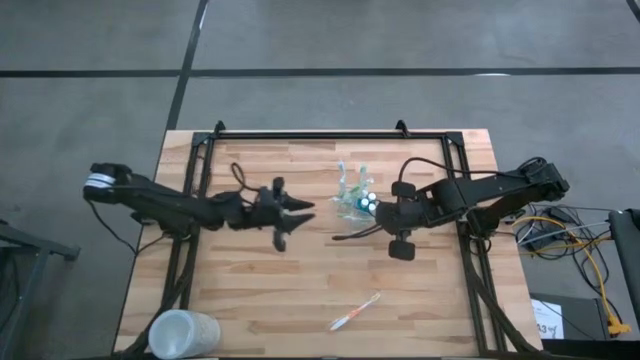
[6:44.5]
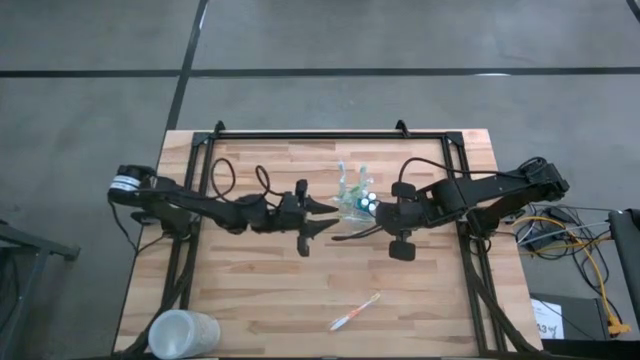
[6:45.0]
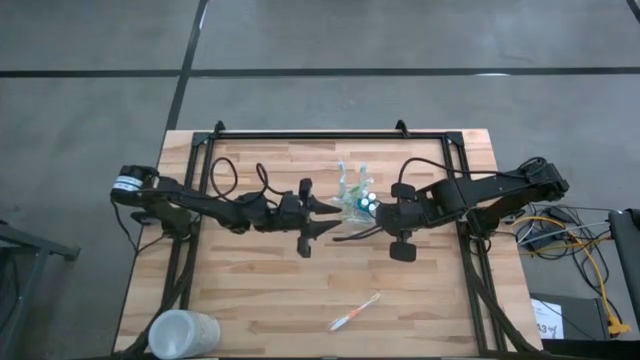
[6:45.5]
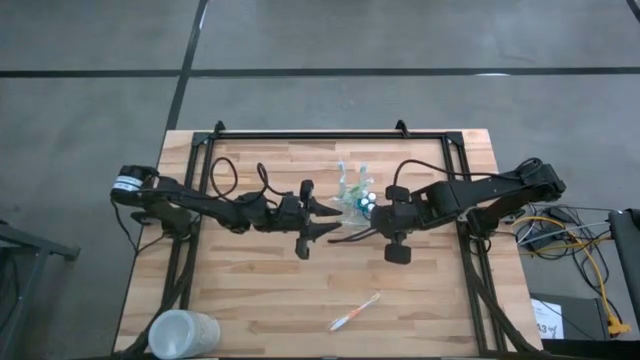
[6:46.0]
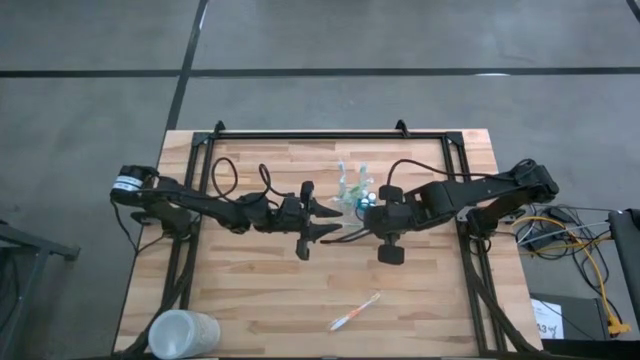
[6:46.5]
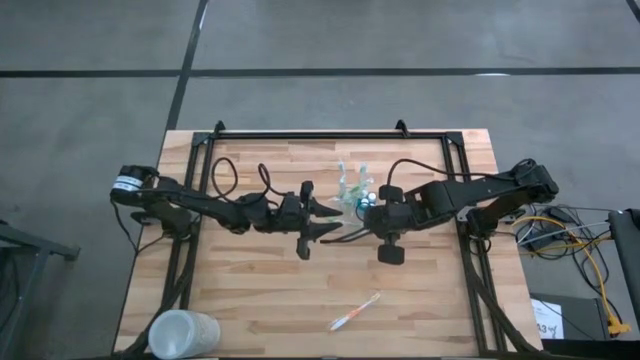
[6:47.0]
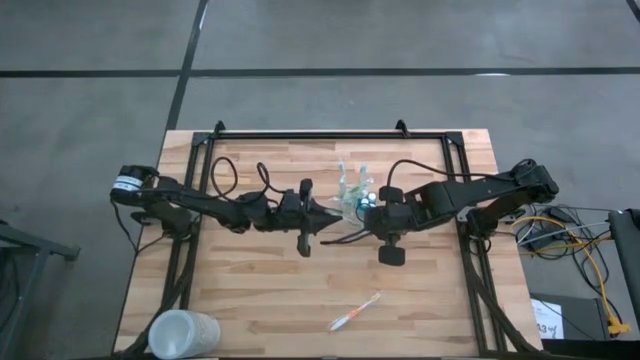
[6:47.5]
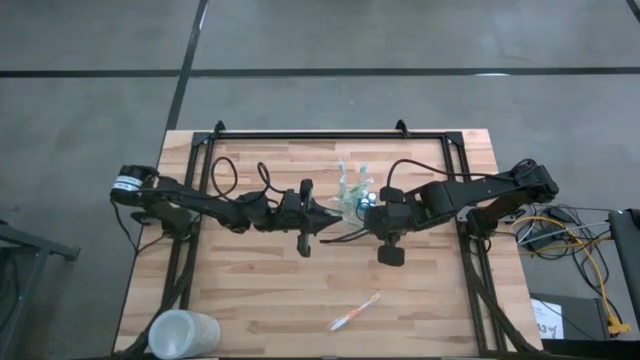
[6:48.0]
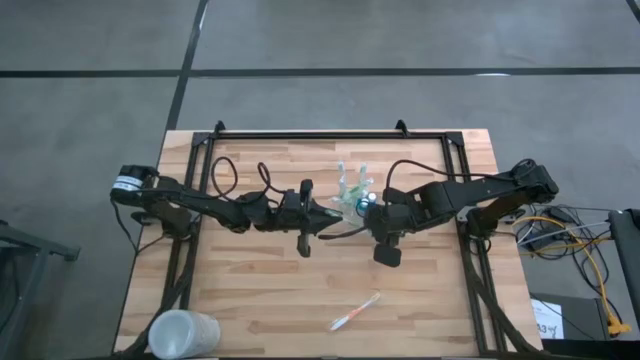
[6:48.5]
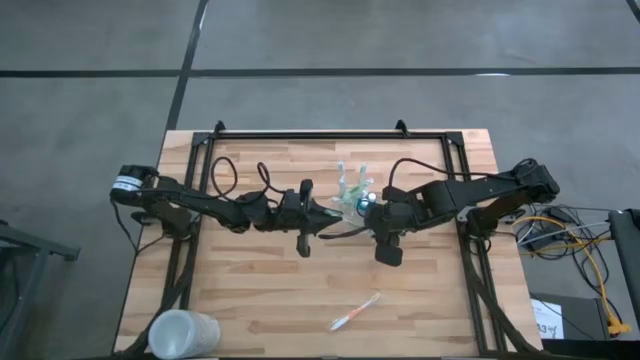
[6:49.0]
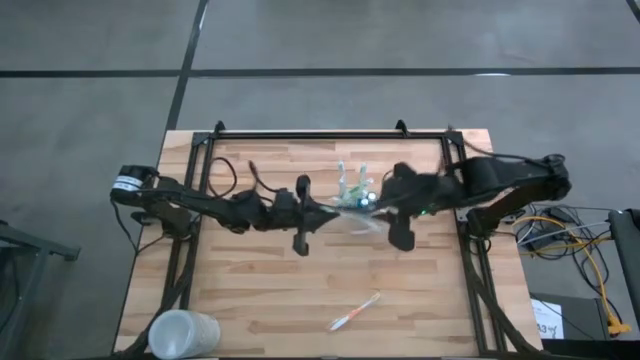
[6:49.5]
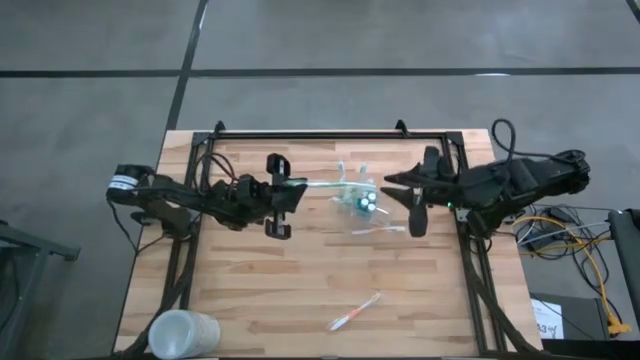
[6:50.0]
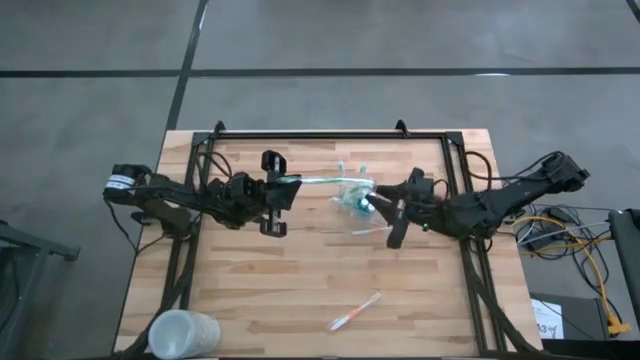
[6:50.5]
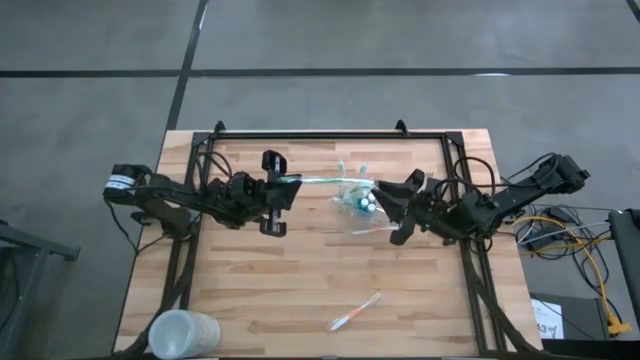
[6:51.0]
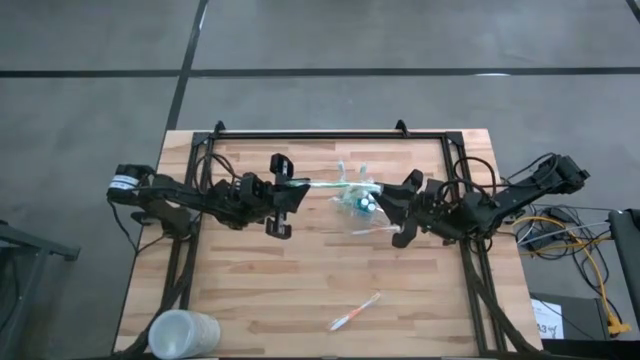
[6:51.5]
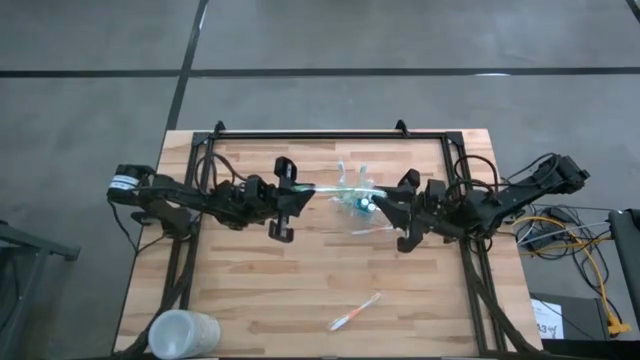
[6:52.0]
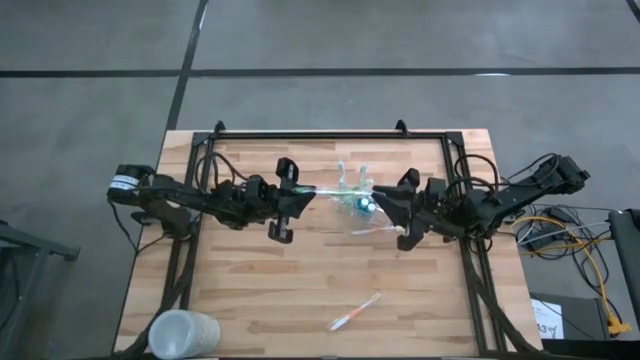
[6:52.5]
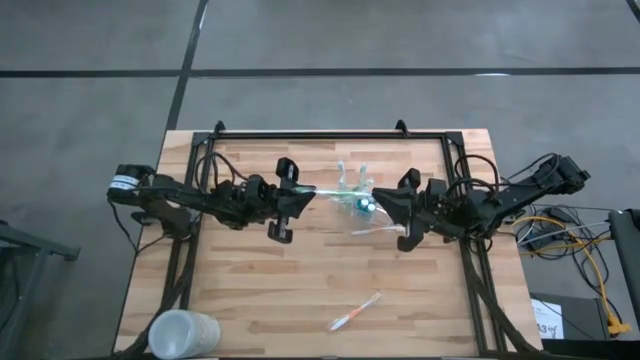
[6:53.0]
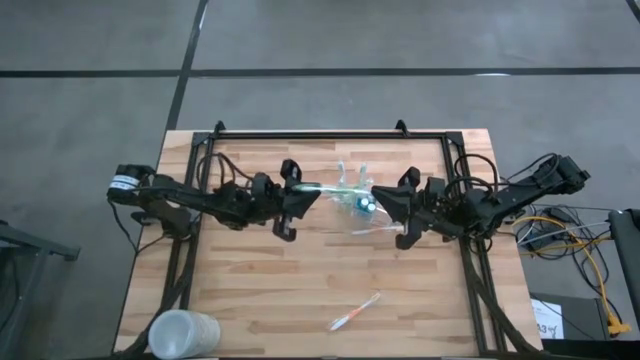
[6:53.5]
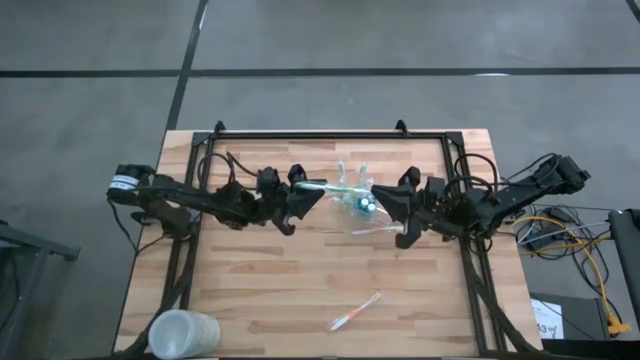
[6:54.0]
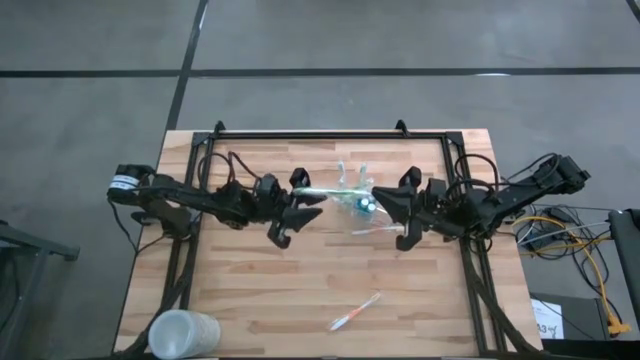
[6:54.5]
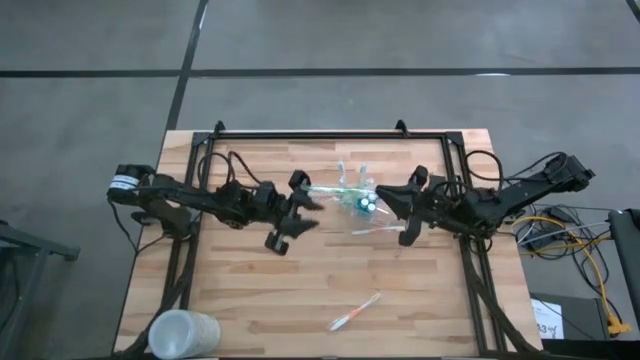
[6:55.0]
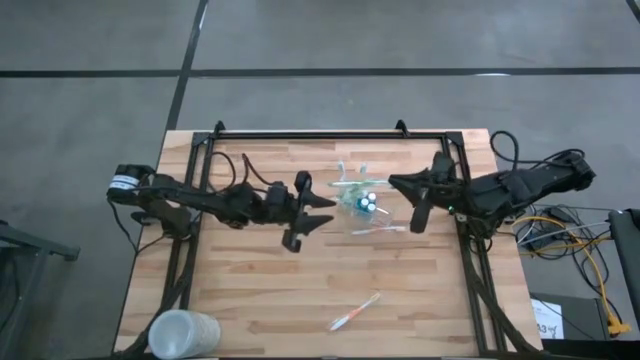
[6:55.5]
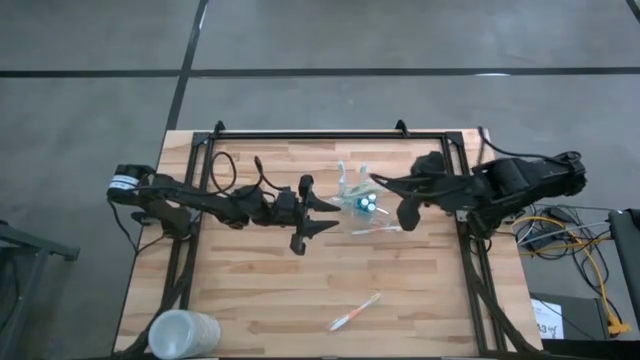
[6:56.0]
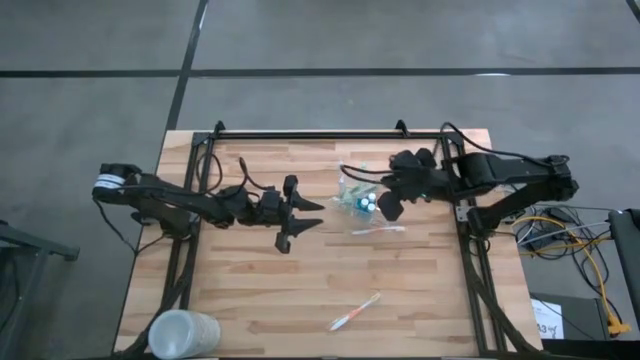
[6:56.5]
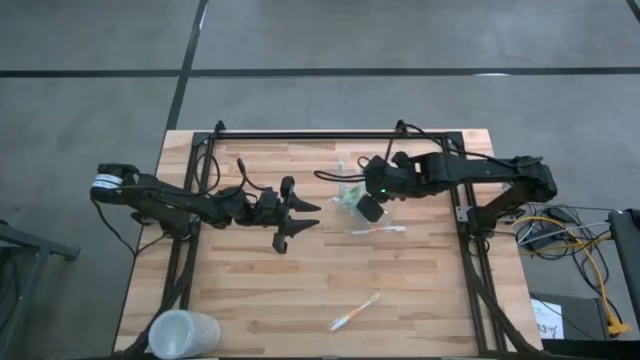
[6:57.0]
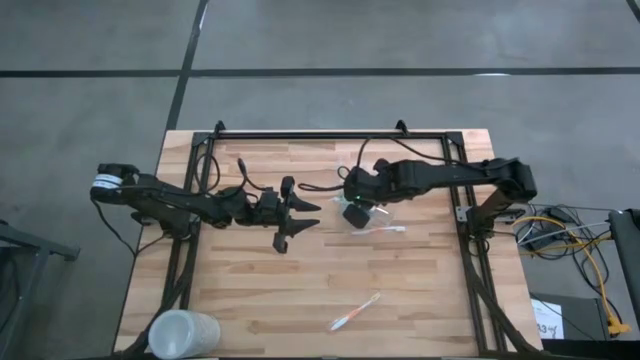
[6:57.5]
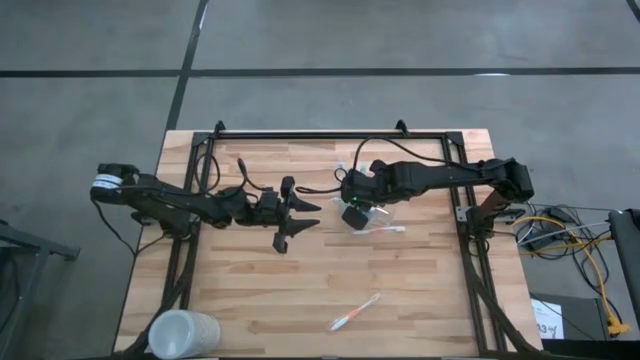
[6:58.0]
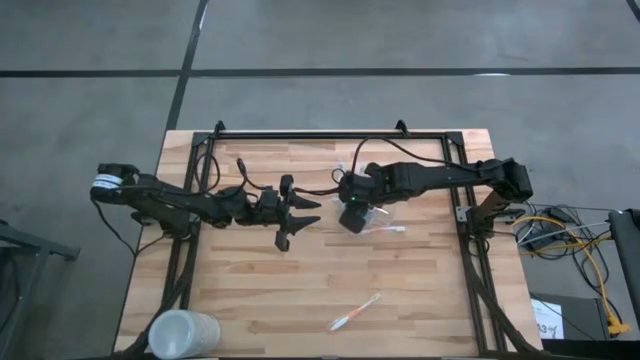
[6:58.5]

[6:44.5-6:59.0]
Task: Pick & Place toothbrushing station
Put the green toothbrush into the transparent organizer

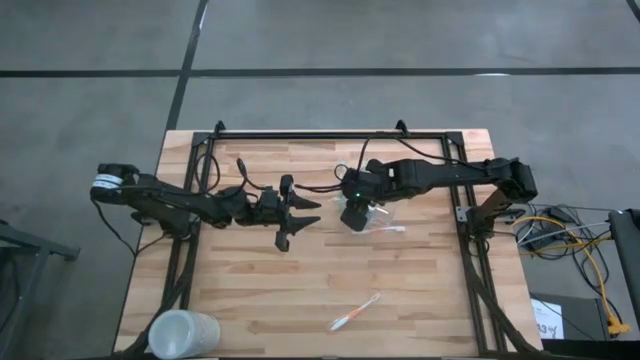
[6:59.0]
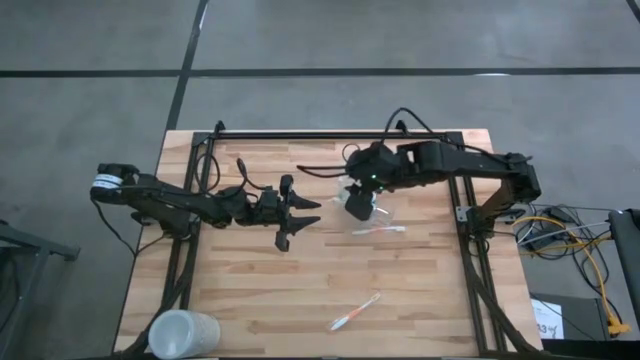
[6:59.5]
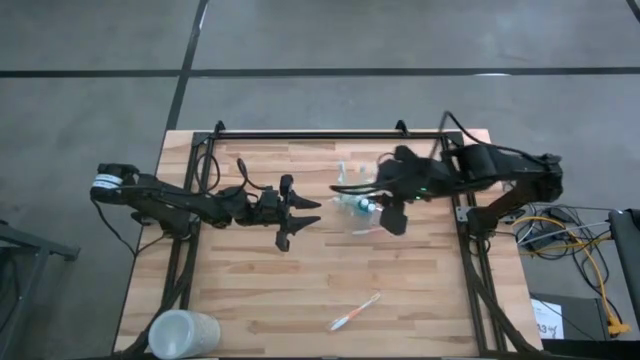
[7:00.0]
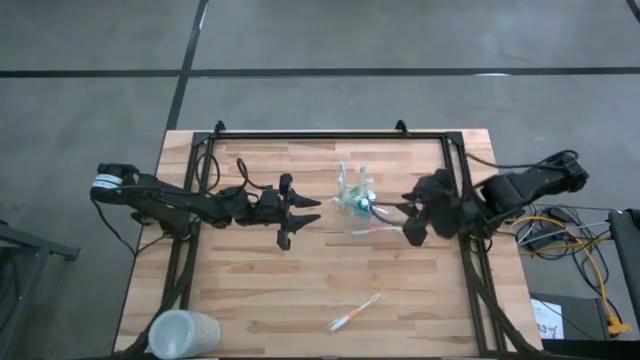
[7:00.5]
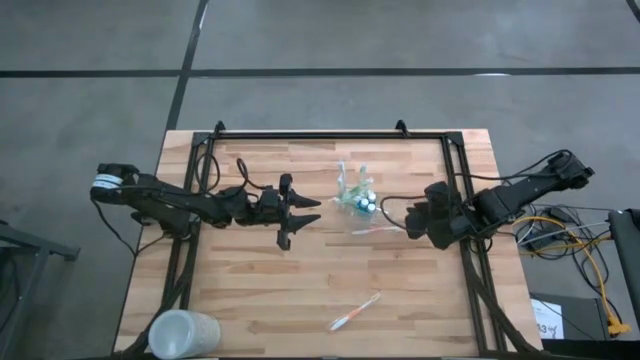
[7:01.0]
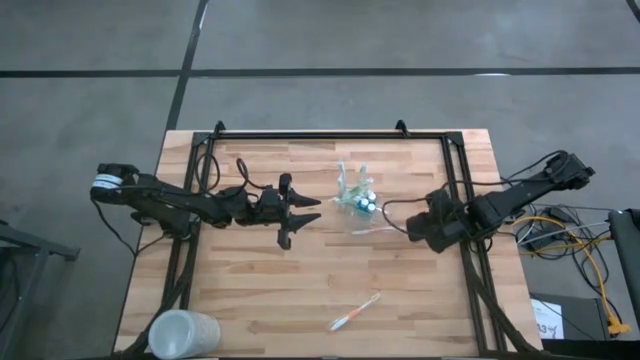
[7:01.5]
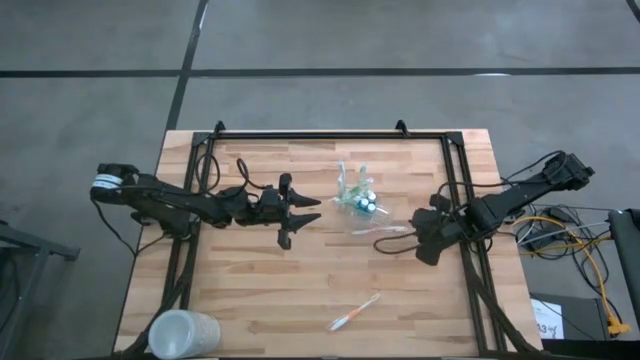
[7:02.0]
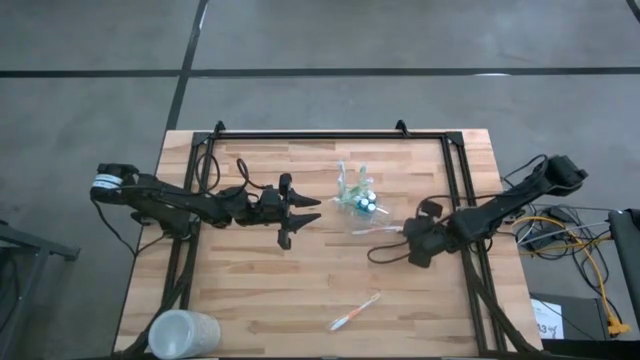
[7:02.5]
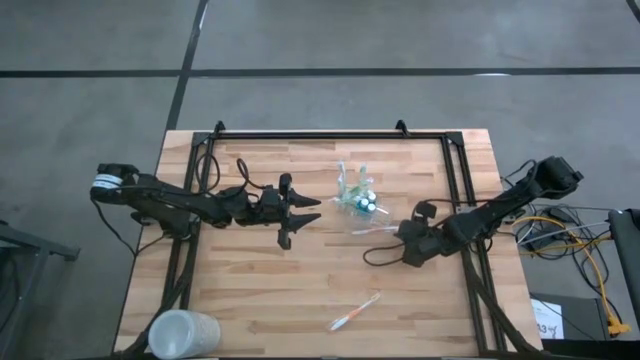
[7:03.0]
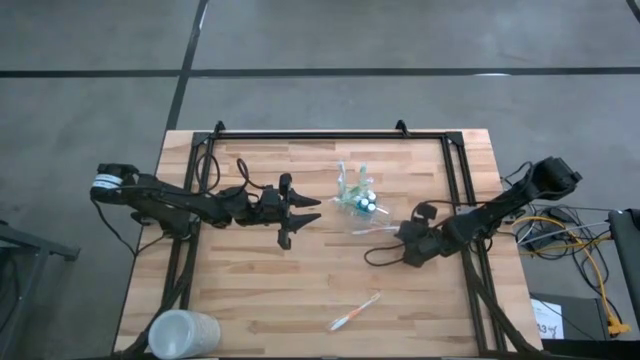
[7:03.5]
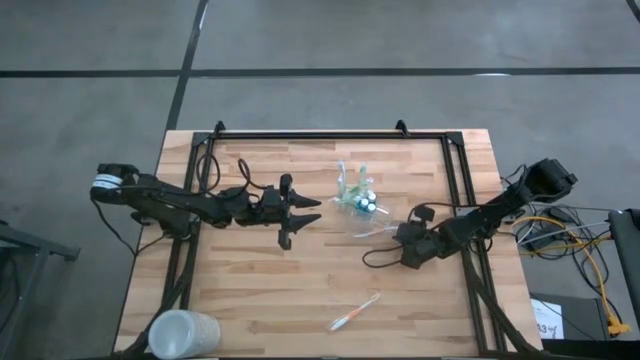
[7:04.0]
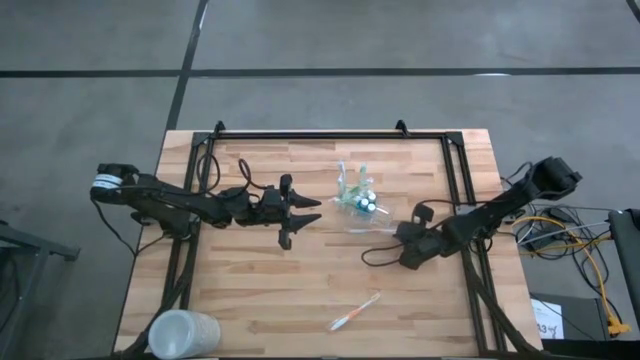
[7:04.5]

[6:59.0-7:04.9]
Put the orange toothbrush into the transparent organizer
